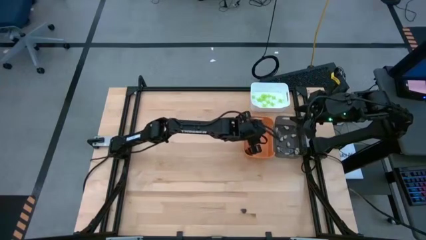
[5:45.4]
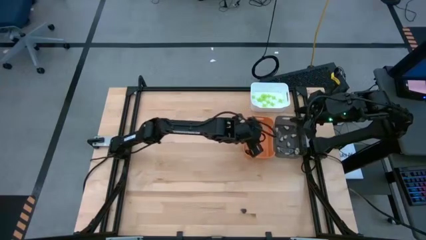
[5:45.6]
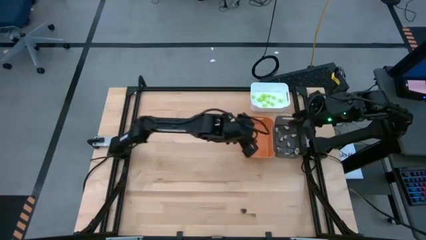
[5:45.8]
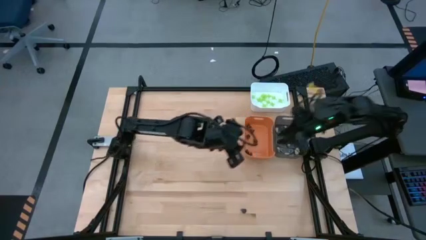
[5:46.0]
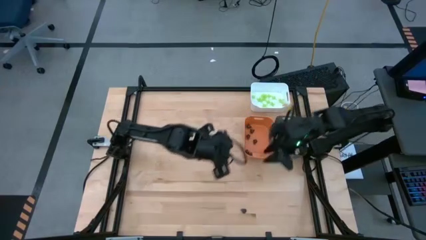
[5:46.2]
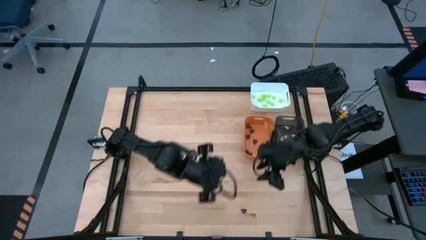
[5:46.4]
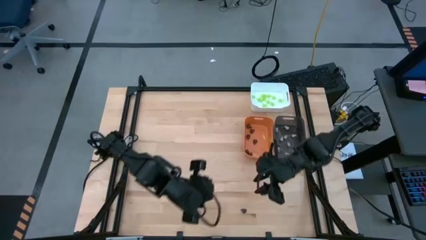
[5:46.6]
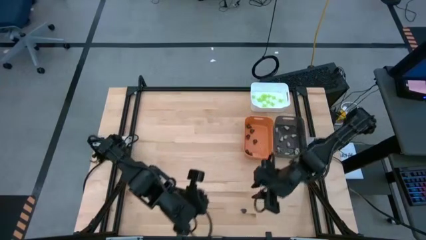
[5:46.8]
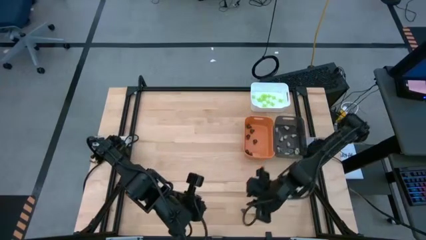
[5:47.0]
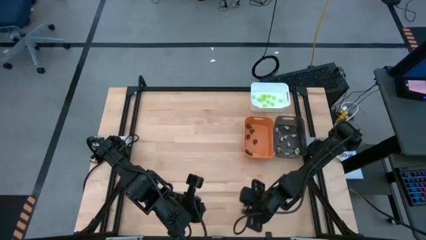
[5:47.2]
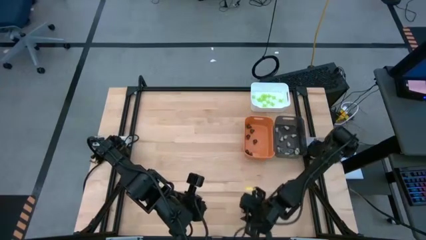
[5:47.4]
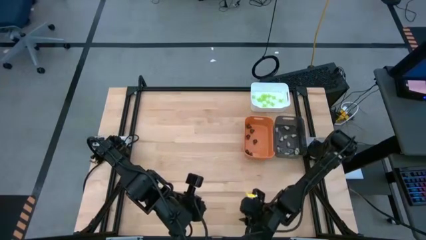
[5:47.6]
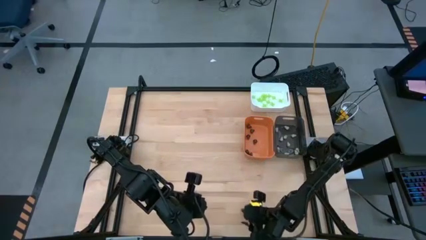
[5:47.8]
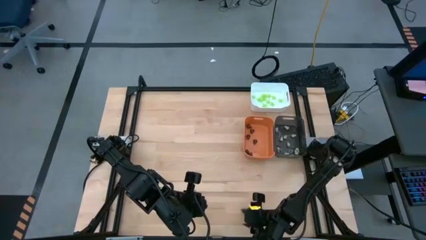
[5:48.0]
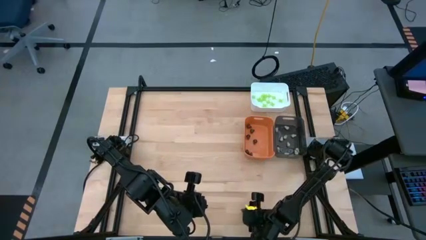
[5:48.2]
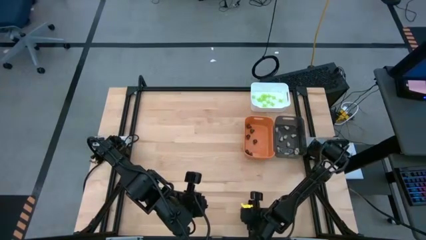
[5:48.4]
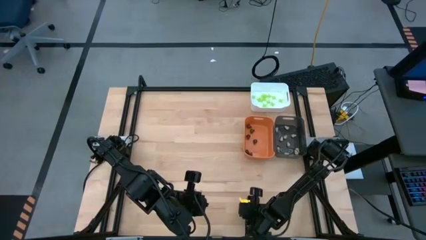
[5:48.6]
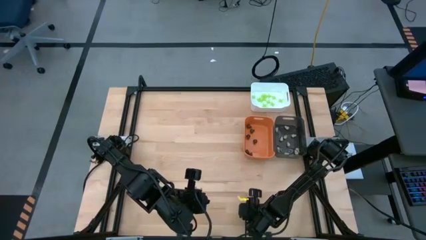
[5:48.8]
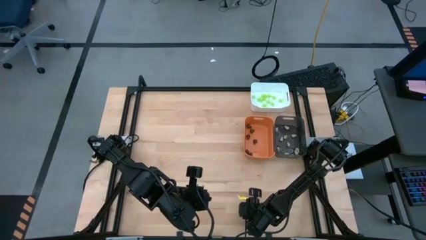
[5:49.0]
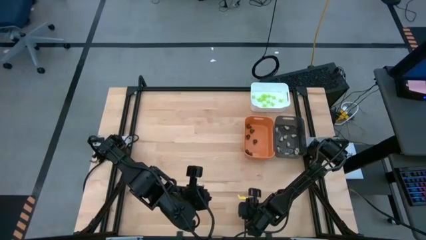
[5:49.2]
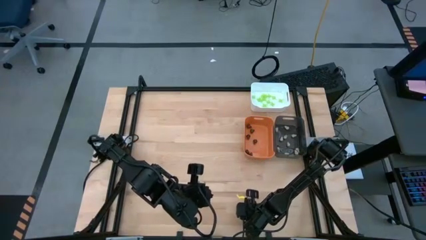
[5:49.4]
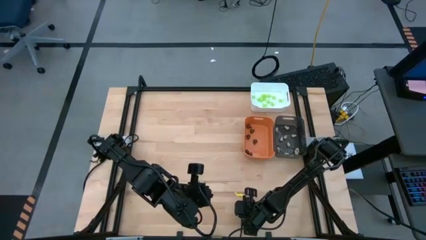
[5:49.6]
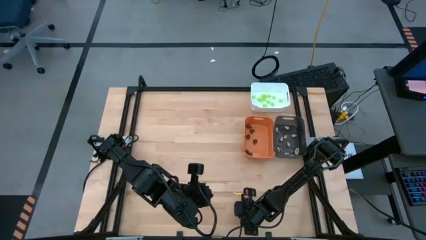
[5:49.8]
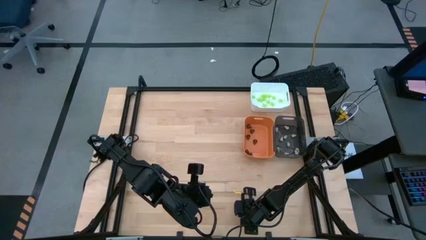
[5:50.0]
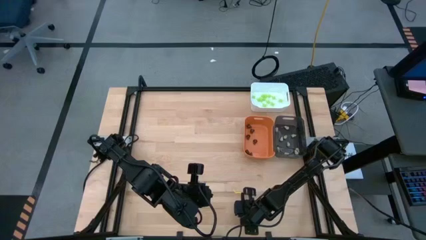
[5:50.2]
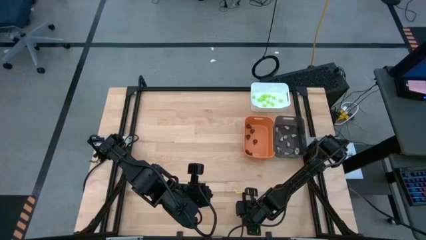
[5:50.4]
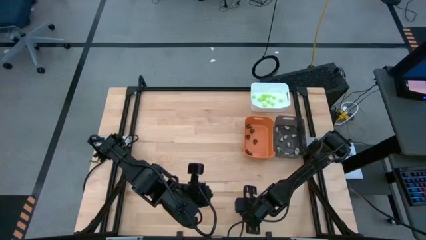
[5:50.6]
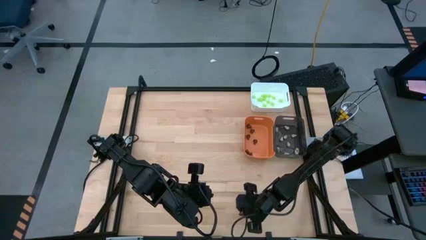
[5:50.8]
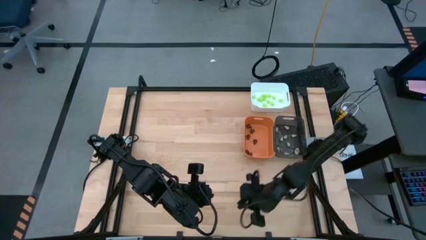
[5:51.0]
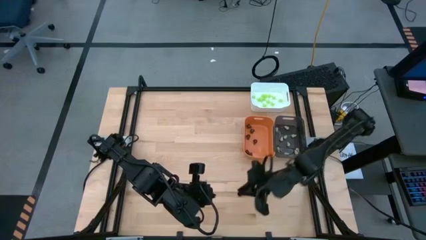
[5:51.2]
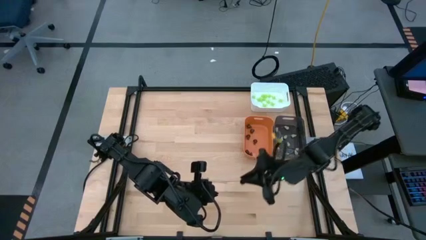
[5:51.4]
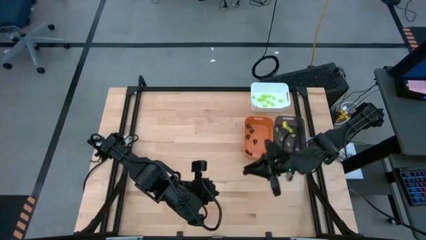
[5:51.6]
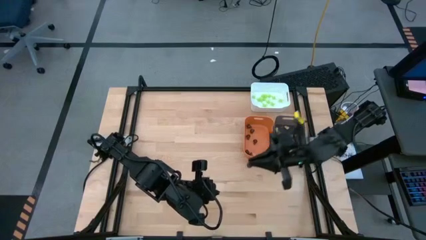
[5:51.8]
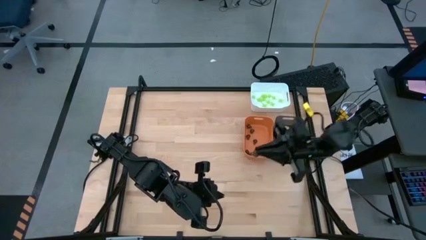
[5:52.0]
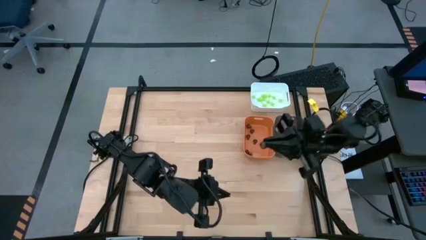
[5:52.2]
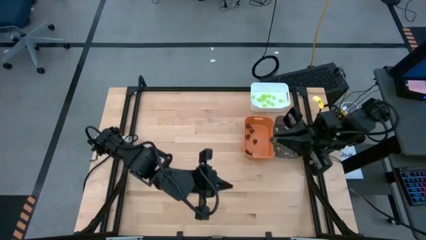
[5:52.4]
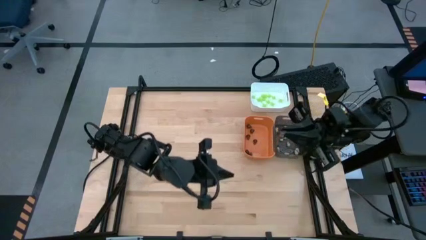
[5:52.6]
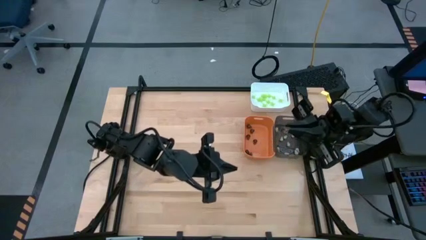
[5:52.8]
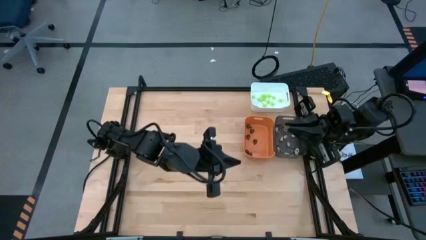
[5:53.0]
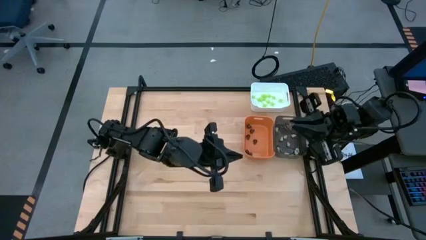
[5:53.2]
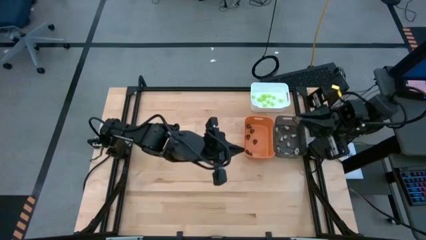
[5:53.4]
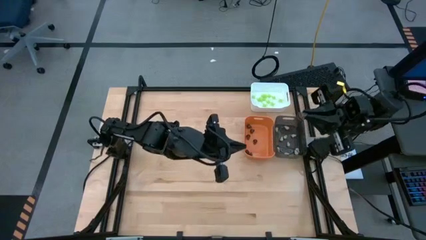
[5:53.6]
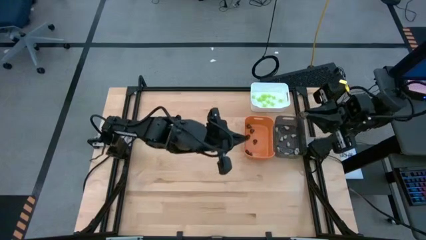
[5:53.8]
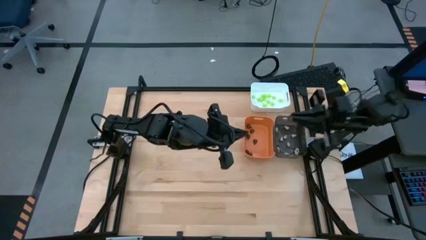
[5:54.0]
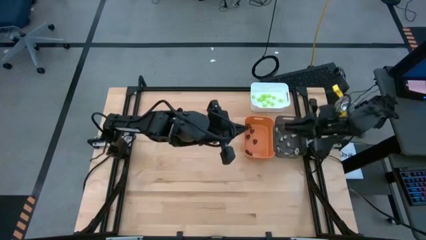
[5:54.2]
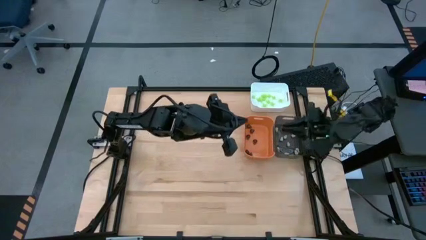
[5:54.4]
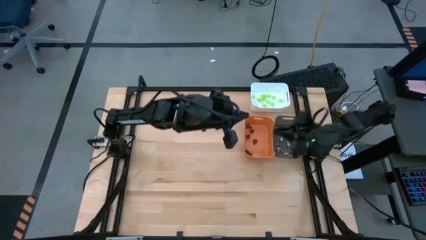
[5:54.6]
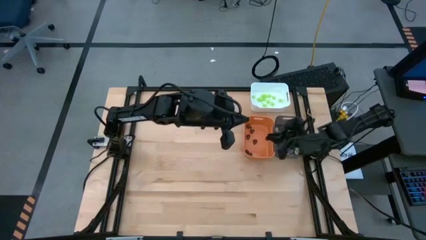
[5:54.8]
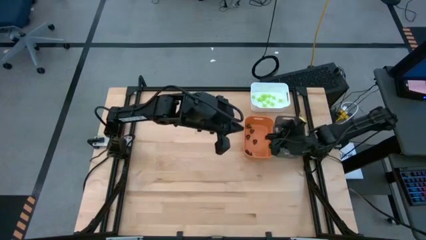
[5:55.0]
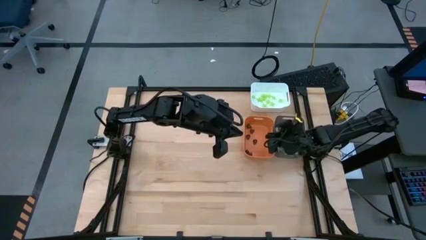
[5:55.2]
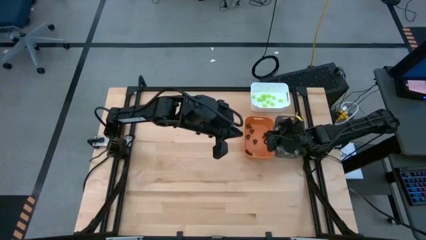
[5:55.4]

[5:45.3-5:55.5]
Task: Sort Halloween decoration
Put the black skull toy into the orange bin

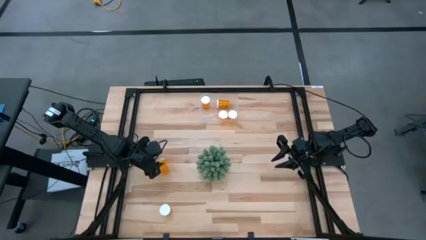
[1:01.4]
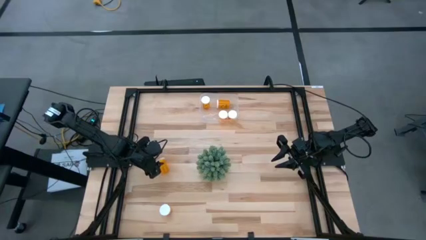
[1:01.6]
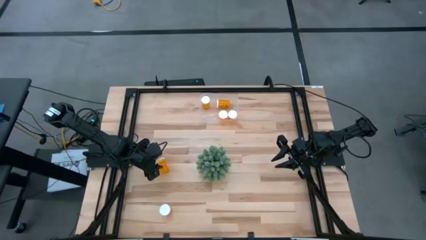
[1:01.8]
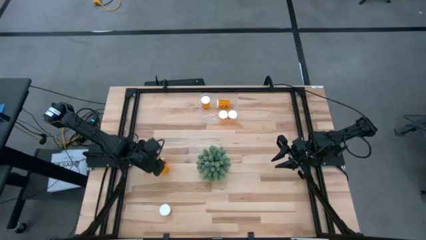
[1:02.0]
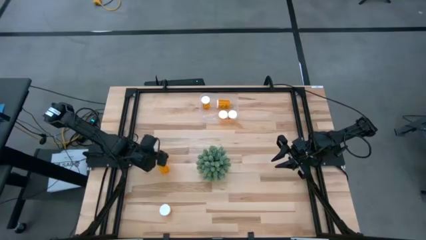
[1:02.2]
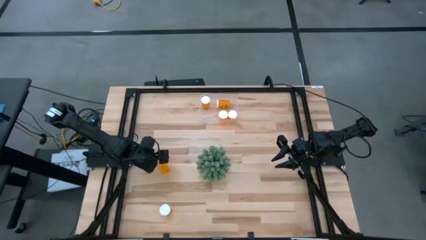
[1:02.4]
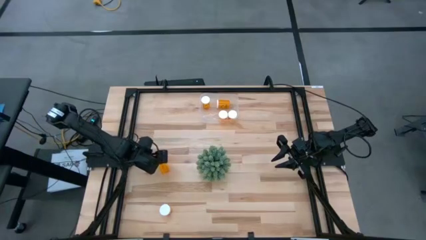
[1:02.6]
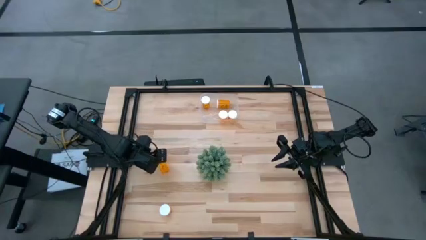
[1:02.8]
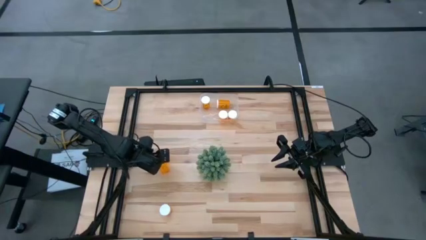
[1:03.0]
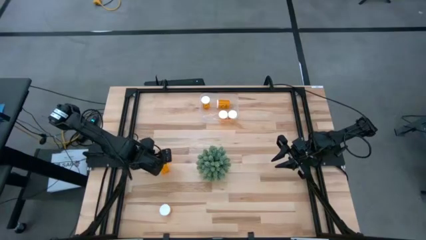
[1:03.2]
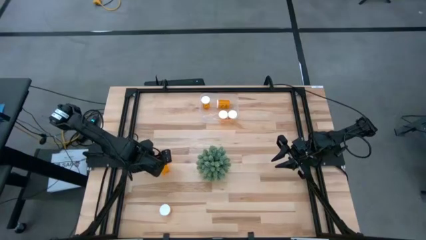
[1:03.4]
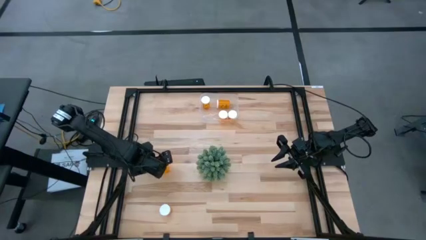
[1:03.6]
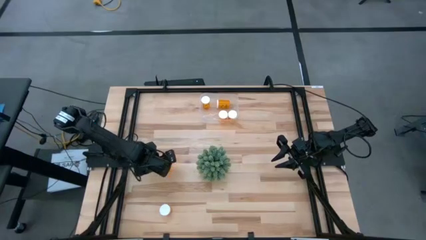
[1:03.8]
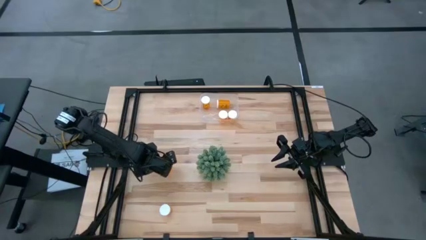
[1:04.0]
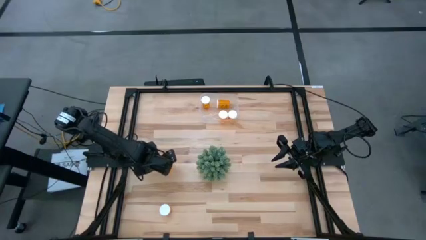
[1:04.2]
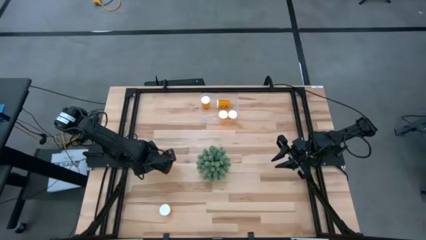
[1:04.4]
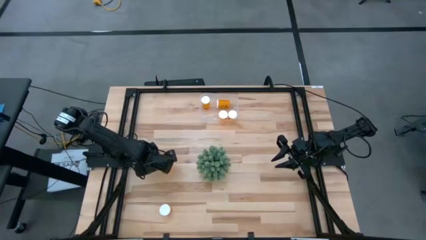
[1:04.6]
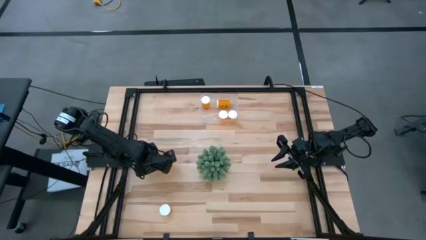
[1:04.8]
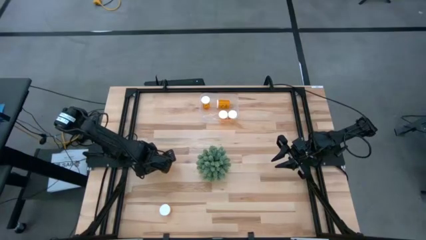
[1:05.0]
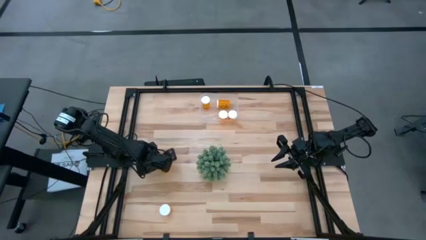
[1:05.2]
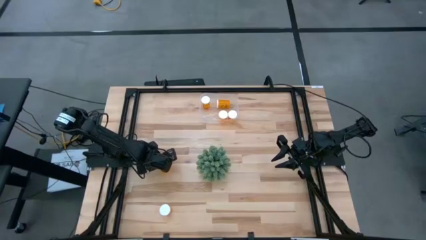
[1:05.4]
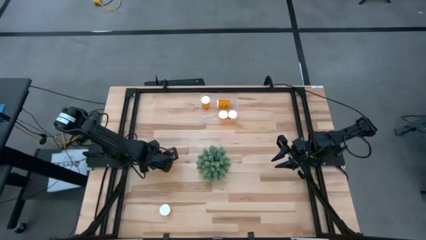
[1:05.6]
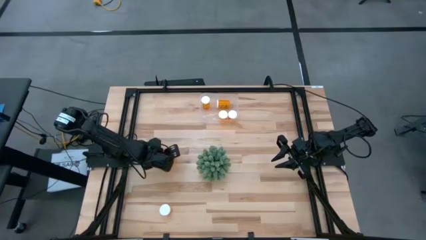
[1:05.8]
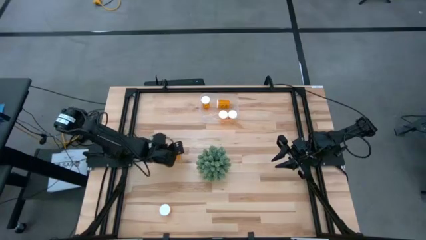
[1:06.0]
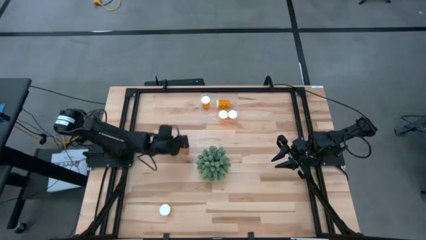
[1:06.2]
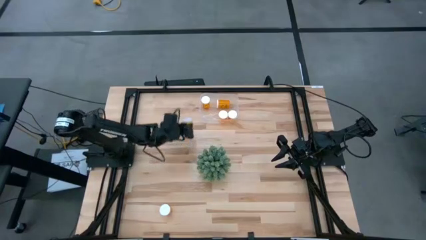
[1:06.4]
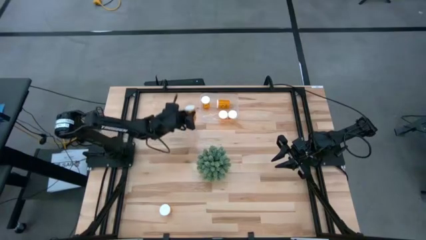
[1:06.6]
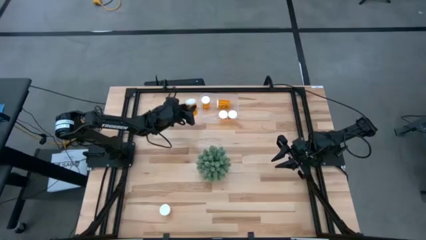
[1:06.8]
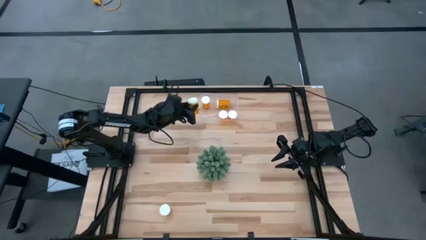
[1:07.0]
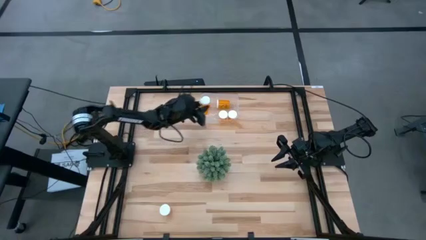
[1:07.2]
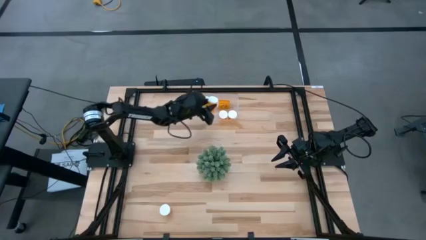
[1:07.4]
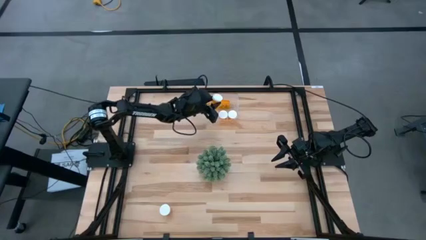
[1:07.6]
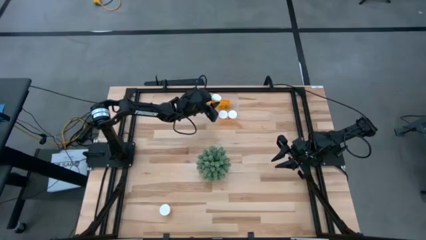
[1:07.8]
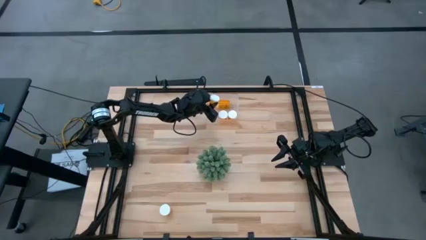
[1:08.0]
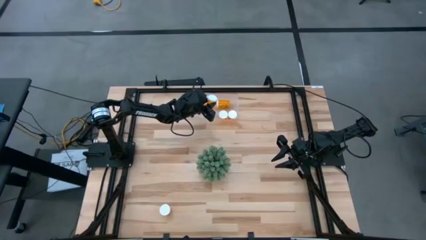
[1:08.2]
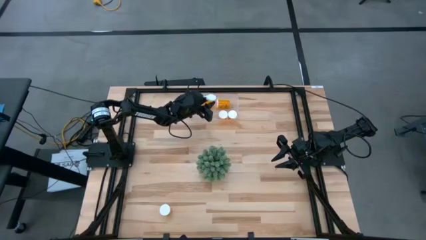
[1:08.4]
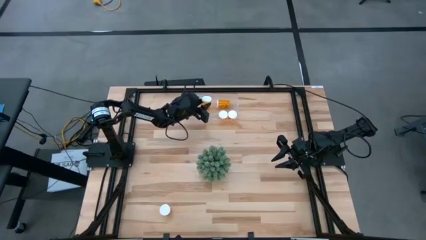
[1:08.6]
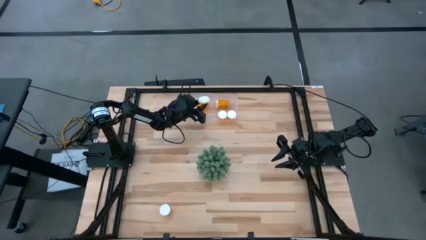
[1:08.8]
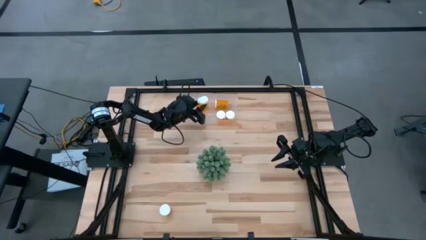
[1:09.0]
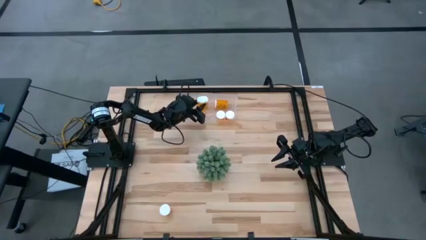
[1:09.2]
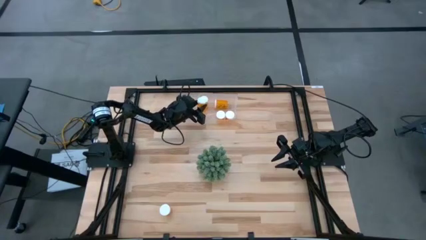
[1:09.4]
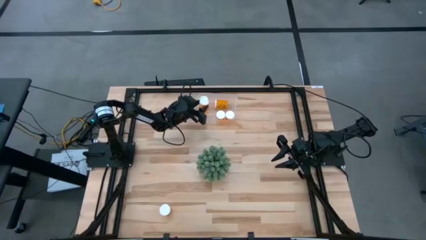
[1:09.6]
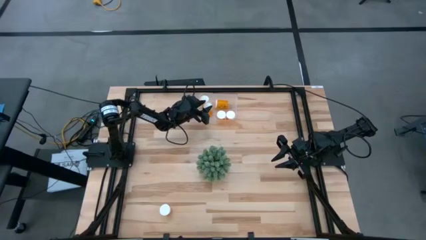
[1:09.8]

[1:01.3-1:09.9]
Task: Pick and place pill bottles into a basket
Put the orange pill bottle into the transparent bin
